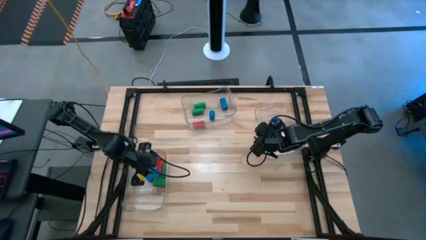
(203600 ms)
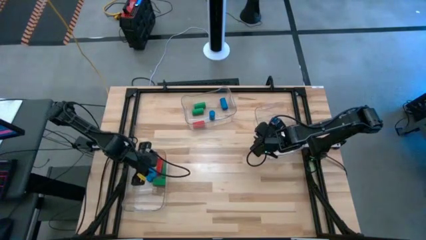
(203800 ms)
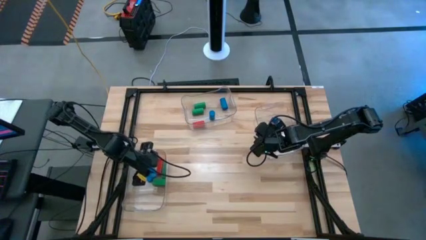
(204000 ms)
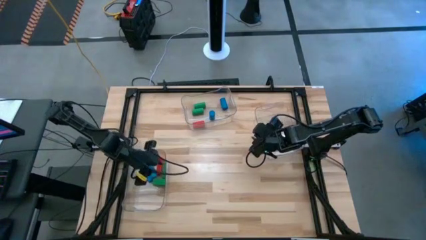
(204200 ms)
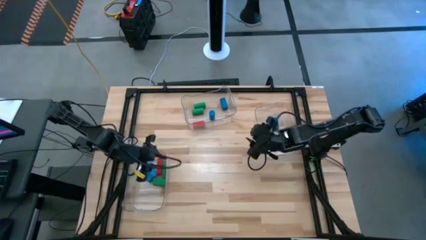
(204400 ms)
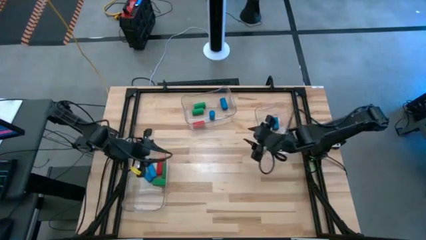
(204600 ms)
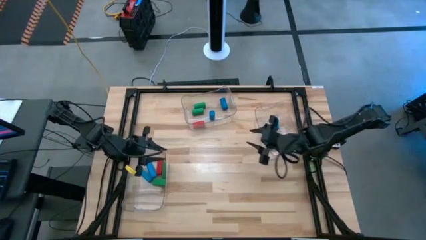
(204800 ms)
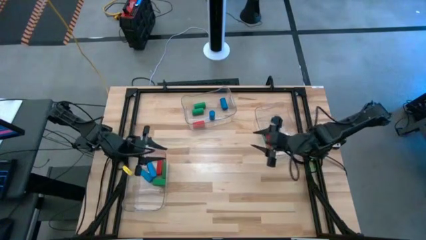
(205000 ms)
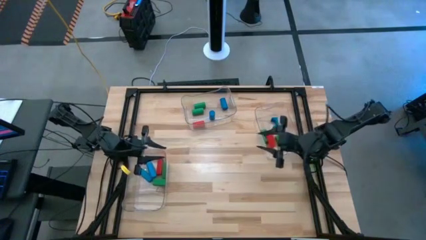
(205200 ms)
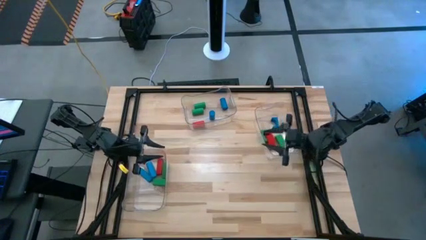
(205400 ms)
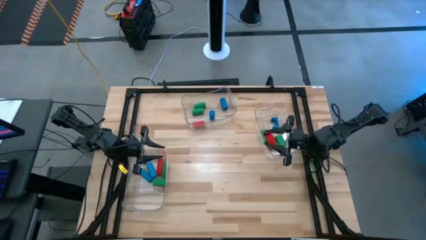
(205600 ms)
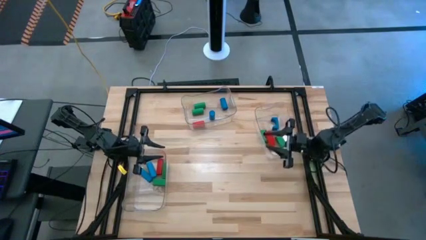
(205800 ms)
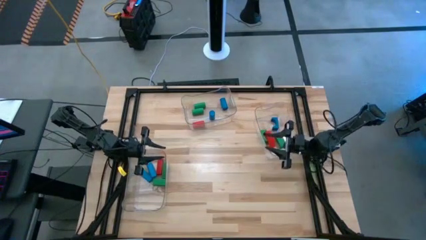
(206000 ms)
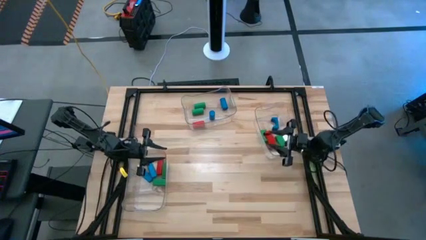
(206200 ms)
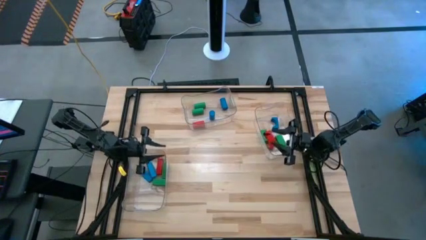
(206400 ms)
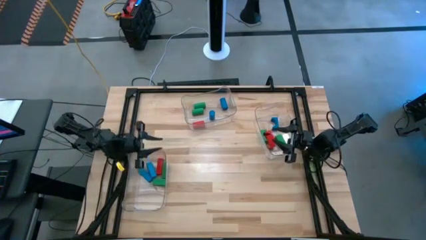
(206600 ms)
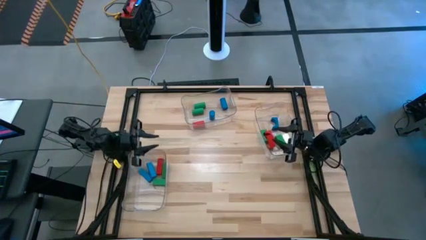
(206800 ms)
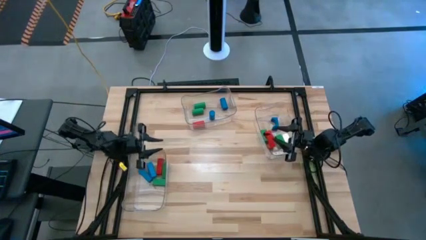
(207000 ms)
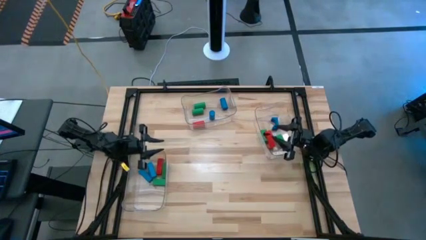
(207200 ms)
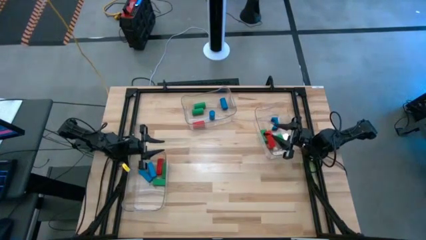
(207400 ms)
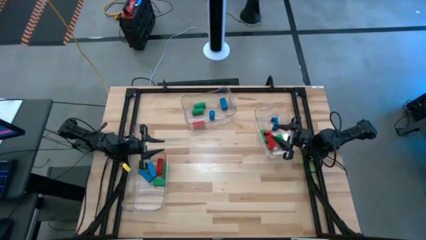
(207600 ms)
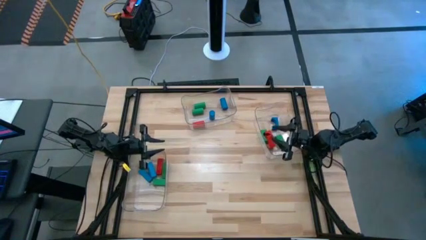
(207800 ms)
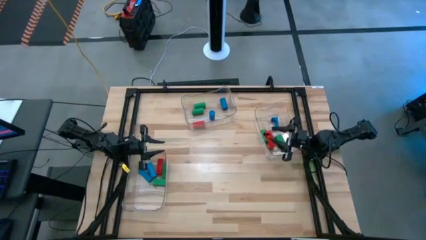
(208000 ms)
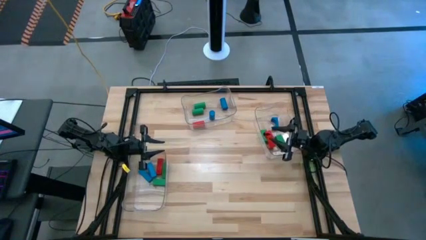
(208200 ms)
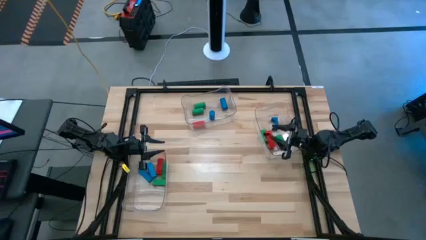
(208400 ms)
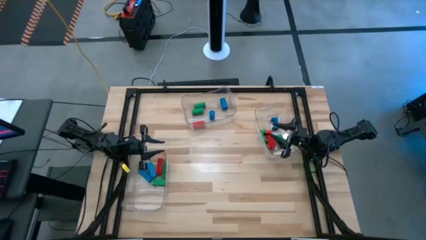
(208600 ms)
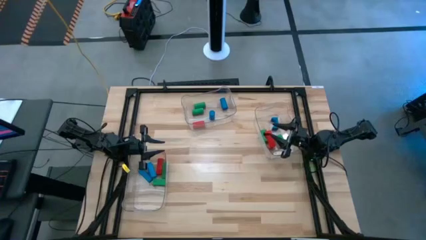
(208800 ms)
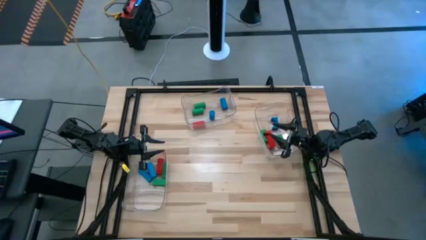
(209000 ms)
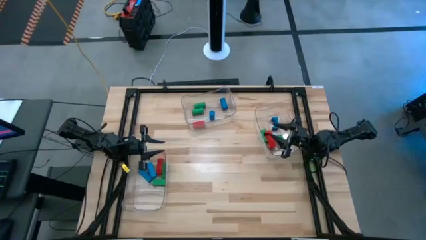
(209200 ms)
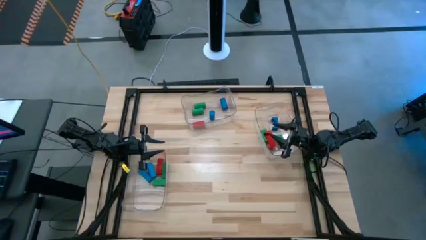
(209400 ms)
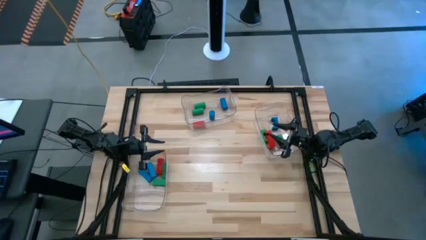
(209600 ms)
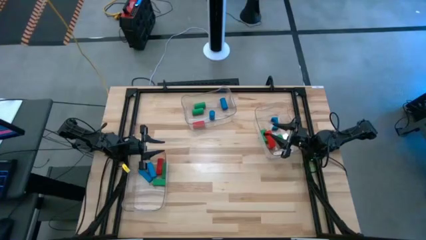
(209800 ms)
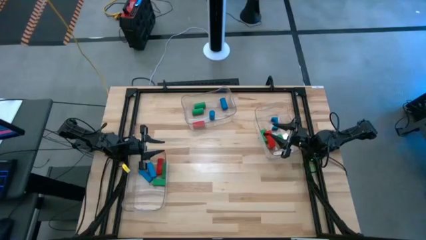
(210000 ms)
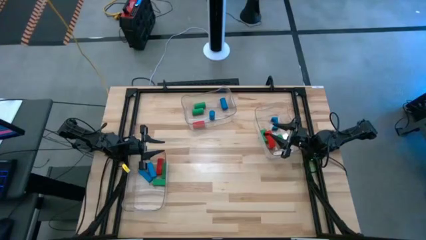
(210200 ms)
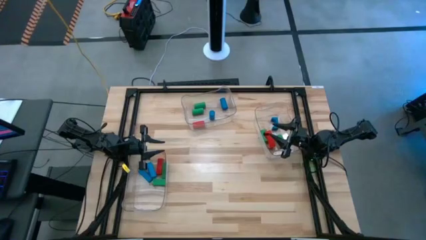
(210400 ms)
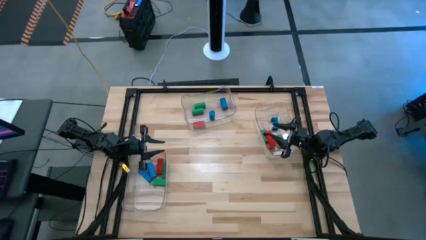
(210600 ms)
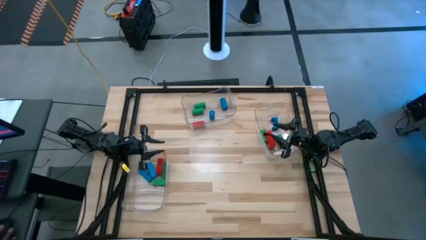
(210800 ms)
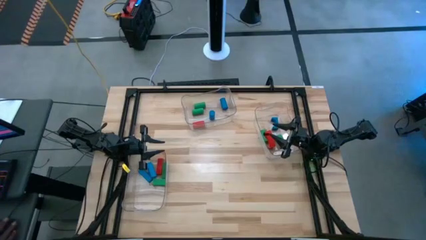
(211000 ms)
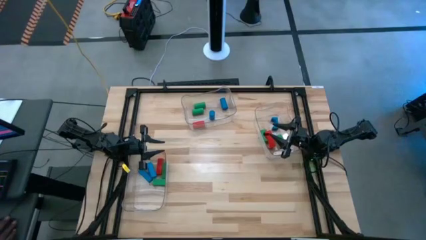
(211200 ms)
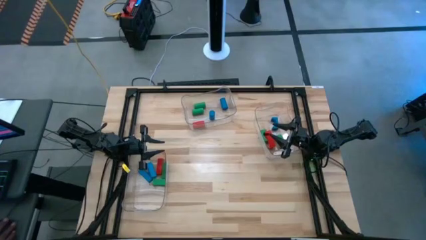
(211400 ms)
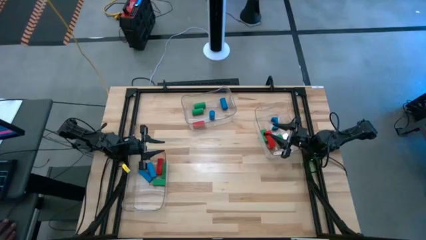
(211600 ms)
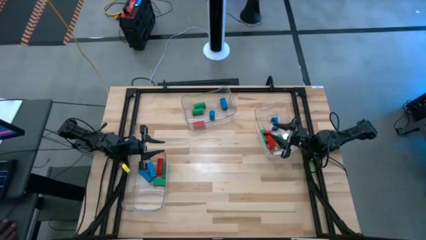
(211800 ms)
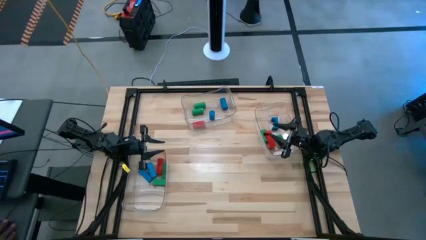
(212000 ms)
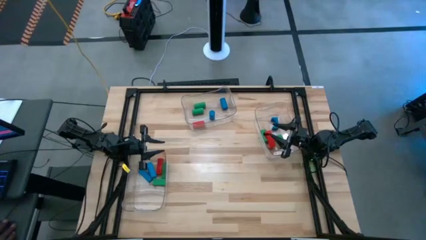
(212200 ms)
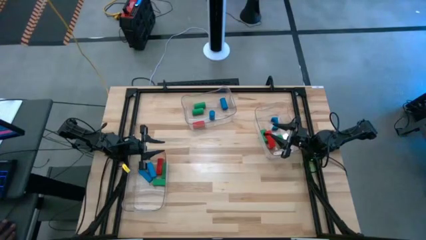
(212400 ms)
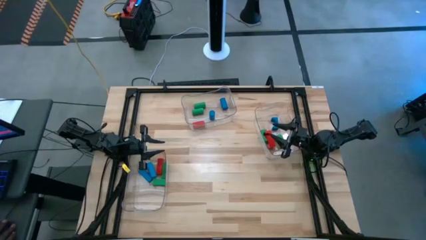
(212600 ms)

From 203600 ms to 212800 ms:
Task: Sort blocks by size
Return to Home Position

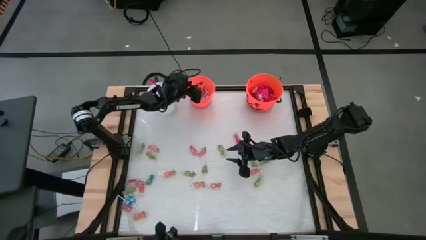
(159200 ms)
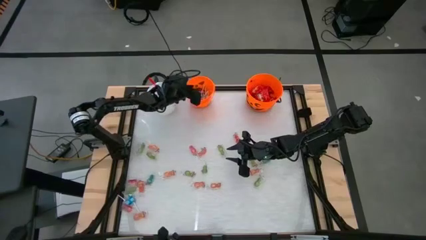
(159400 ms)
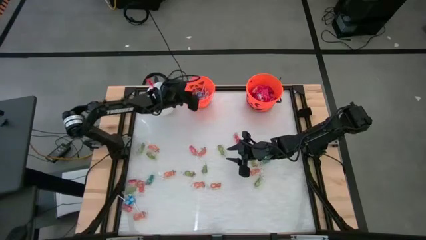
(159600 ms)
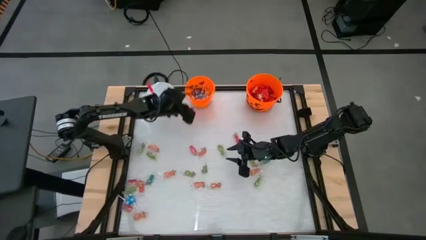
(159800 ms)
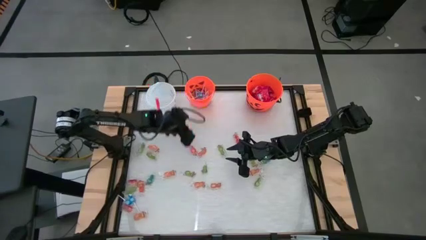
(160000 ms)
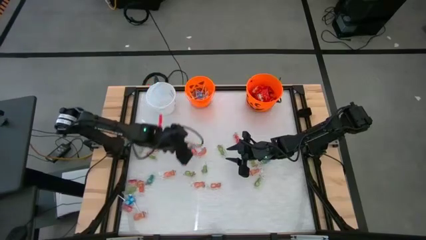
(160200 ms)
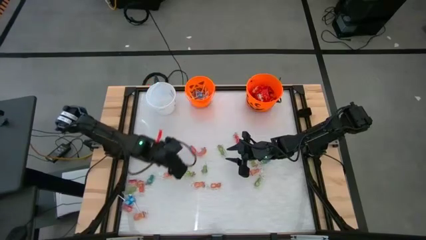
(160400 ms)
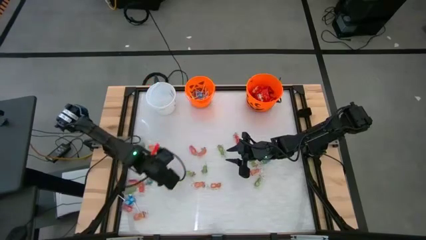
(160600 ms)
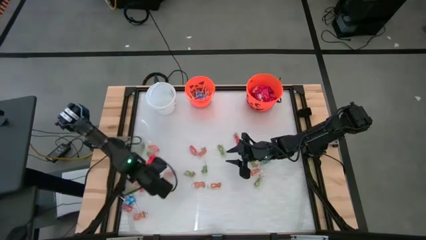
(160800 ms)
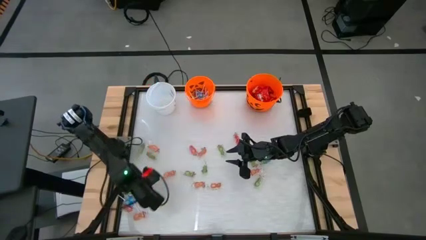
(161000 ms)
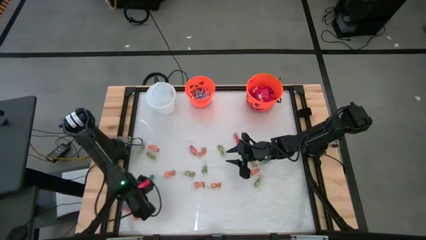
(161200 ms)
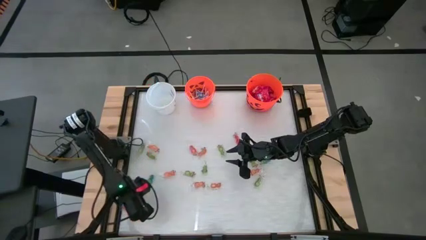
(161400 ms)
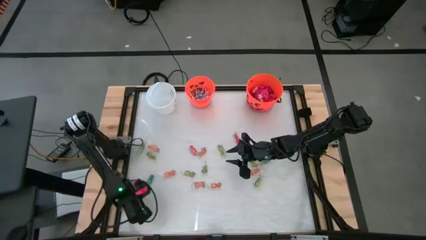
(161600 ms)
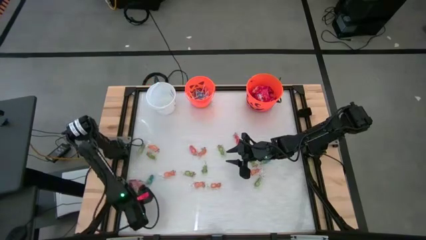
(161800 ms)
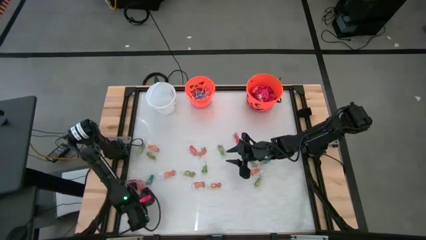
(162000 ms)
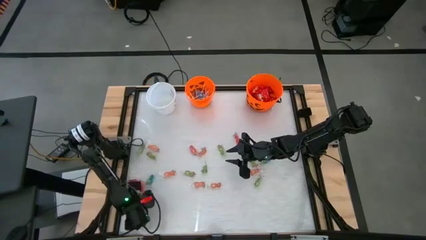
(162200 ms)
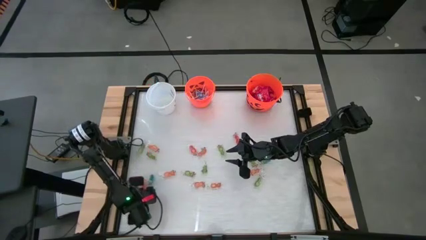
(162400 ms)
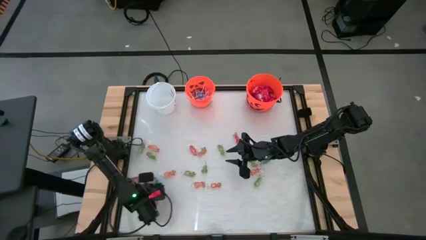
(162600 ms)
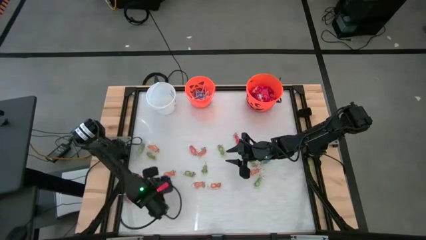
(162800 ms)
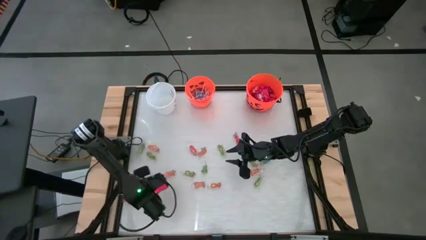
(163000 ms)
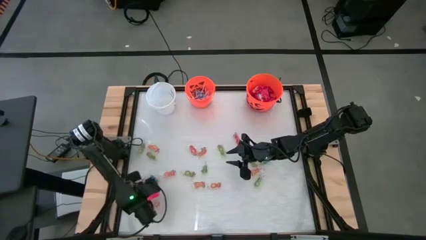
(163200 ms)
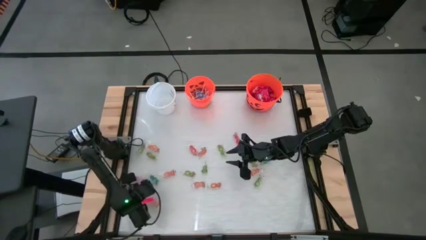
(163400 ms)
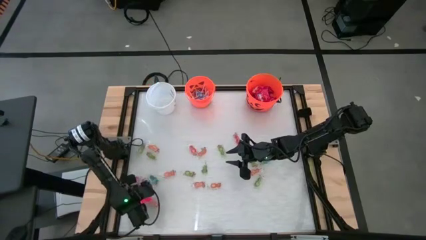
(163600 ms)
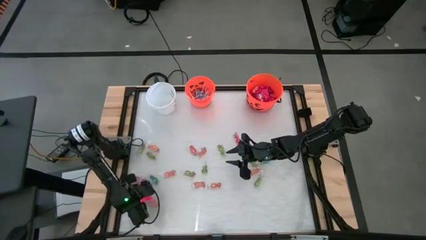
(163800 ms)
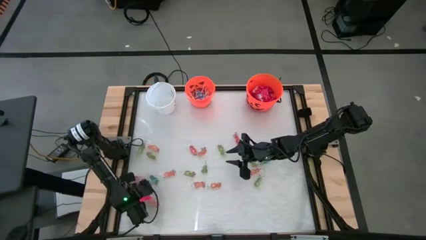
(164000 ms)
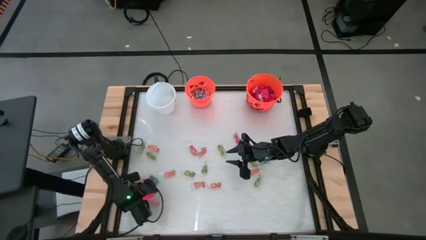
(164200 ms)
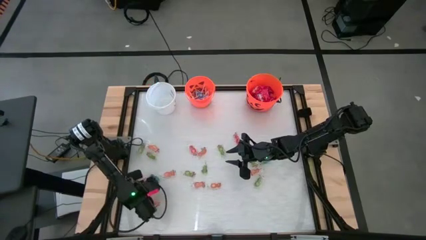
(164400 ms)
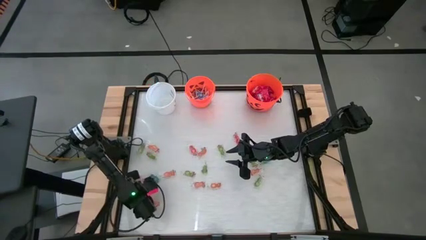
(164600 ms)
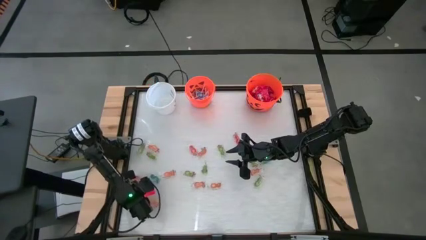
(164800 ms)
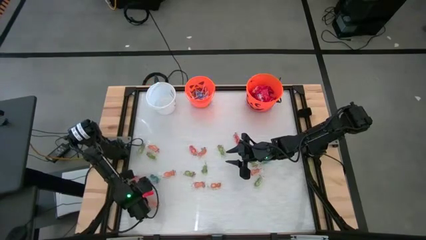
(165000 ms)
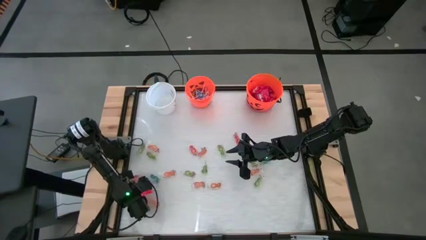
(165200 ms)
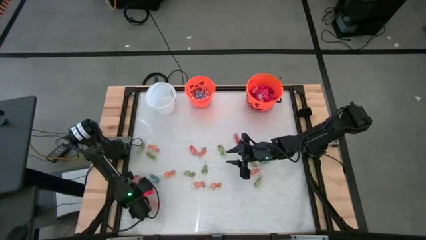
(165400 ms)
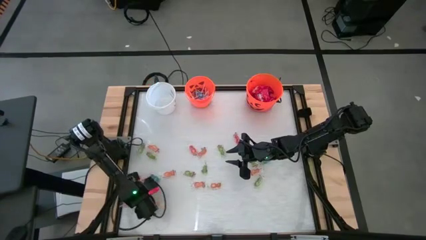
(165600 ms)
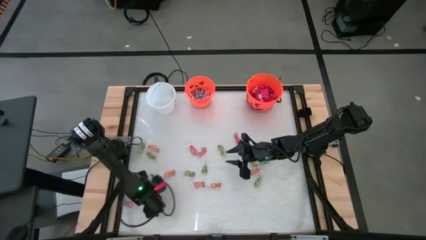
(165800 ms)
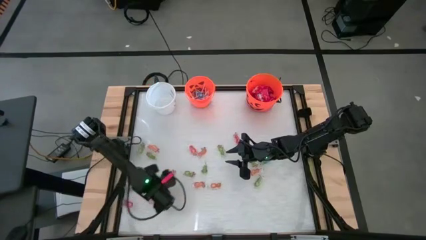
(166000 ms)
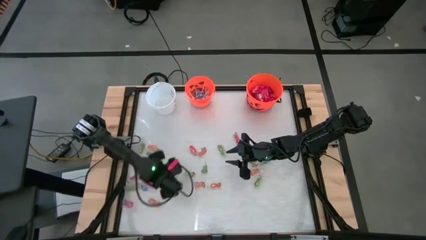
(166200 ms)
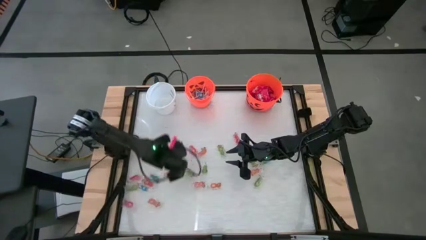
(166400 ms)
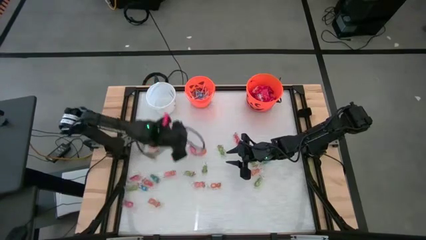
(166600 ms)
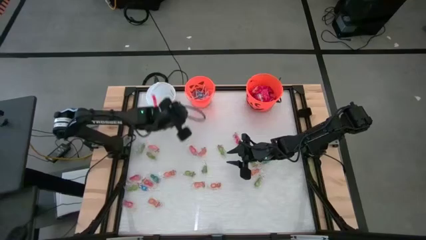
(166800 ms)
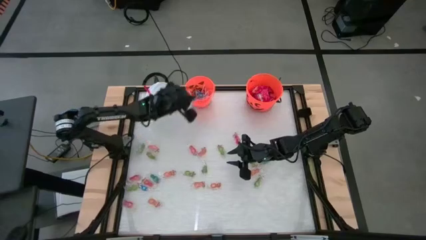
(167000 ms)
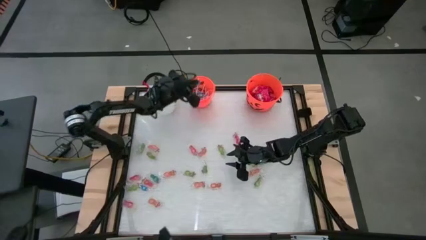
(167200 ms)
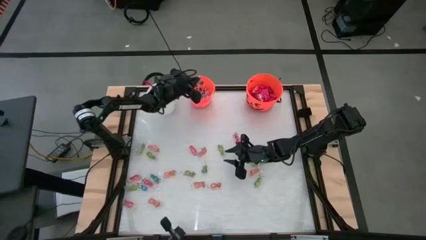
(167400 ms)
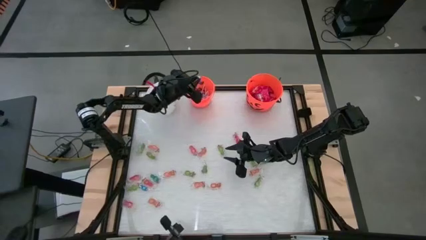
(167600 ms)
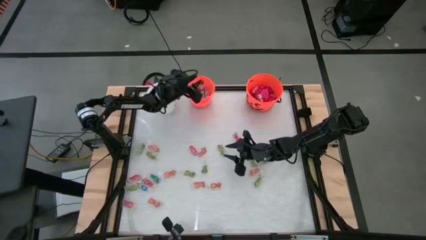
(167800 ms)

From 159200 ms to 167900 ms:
Task: Sort candy by brand, put in halloween buckets
Put the blue lollipop into the left orange bucket
